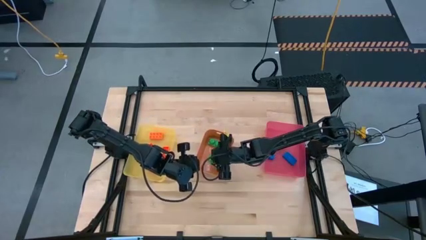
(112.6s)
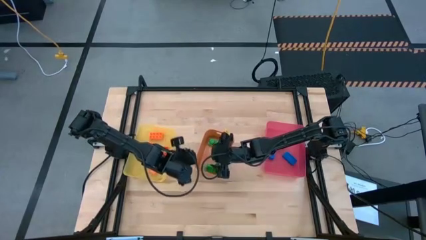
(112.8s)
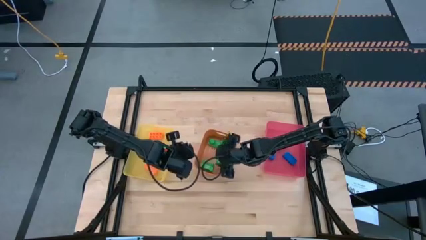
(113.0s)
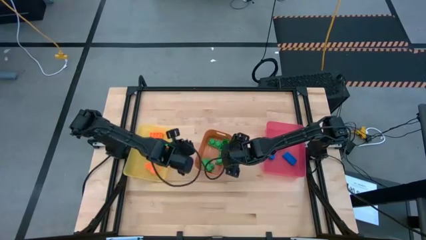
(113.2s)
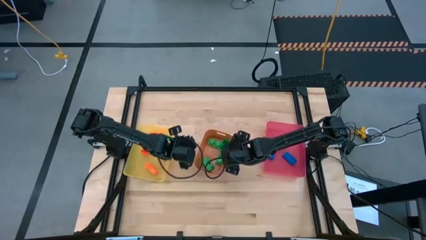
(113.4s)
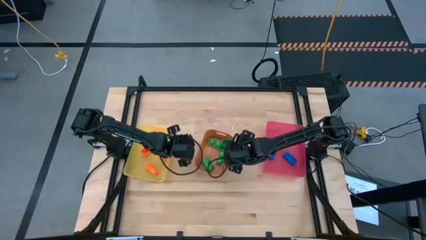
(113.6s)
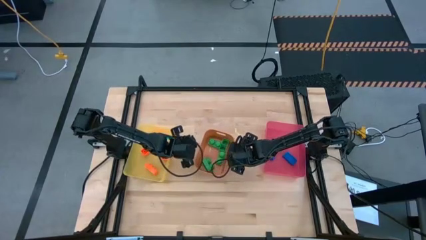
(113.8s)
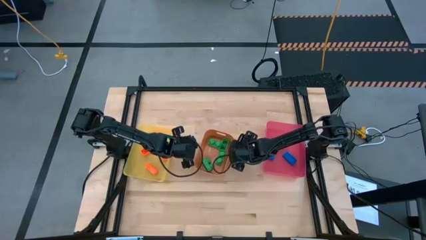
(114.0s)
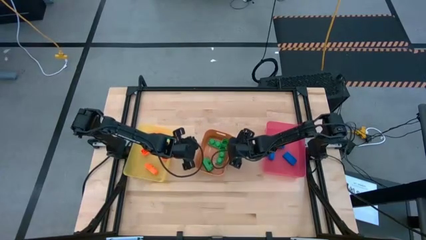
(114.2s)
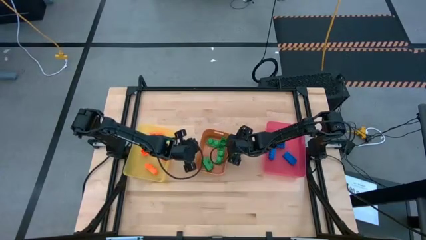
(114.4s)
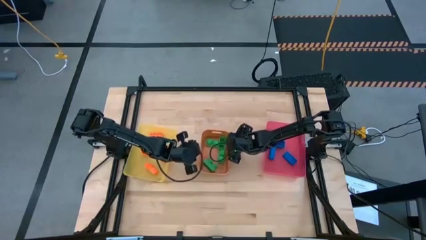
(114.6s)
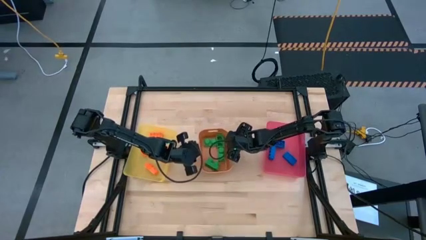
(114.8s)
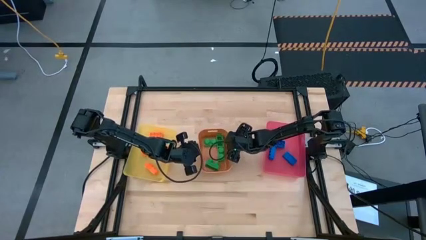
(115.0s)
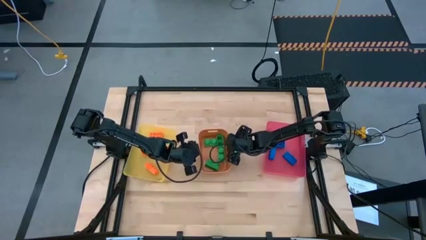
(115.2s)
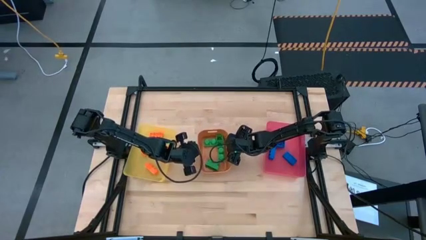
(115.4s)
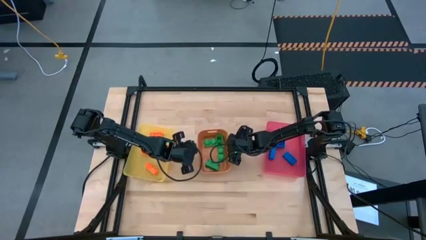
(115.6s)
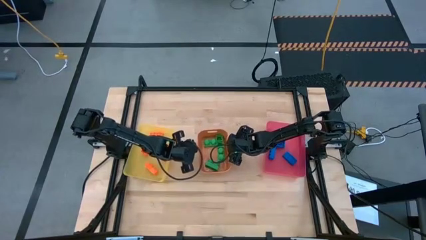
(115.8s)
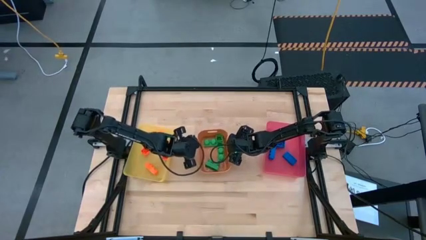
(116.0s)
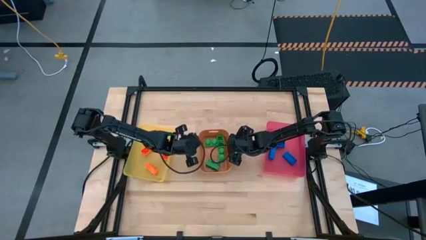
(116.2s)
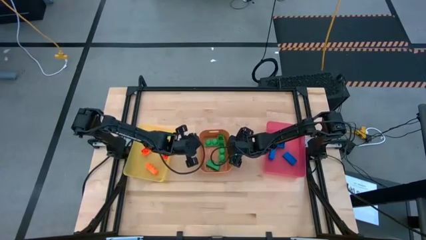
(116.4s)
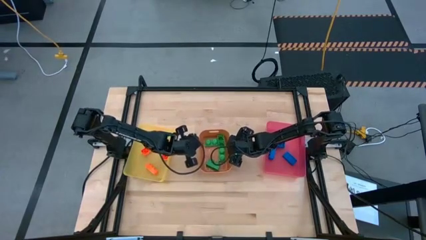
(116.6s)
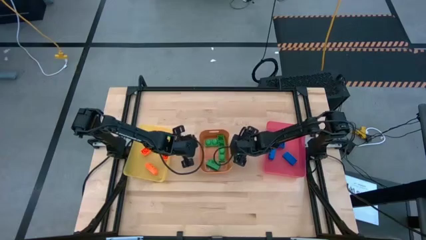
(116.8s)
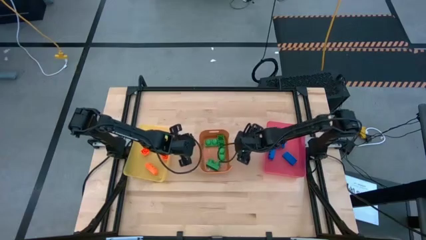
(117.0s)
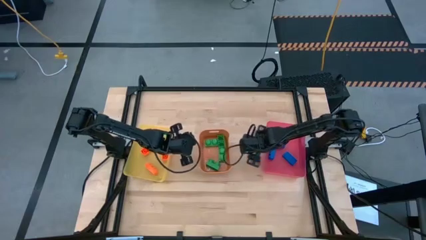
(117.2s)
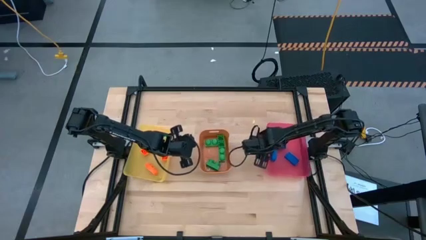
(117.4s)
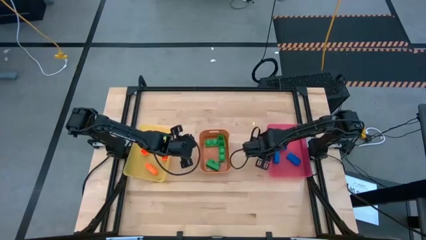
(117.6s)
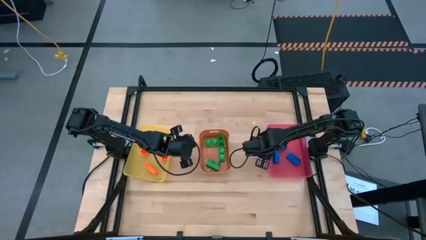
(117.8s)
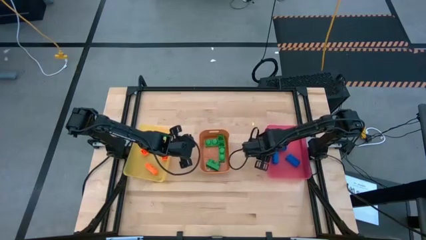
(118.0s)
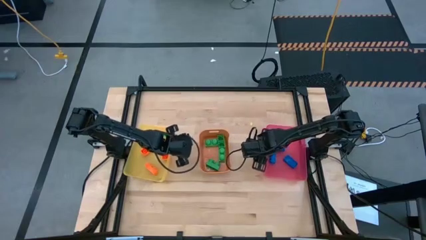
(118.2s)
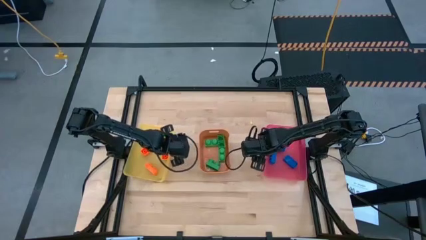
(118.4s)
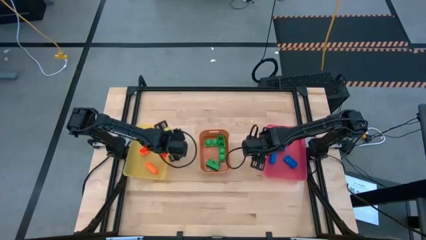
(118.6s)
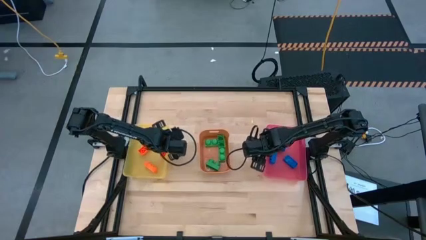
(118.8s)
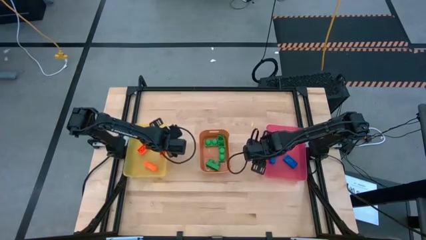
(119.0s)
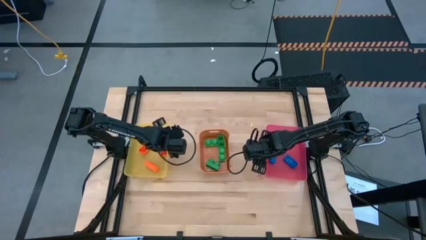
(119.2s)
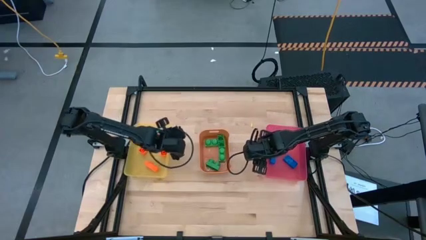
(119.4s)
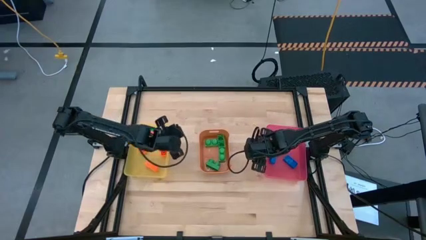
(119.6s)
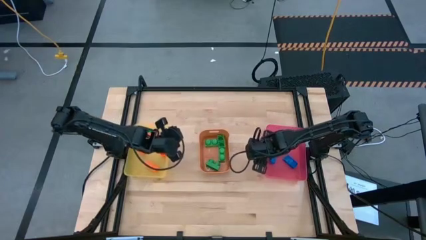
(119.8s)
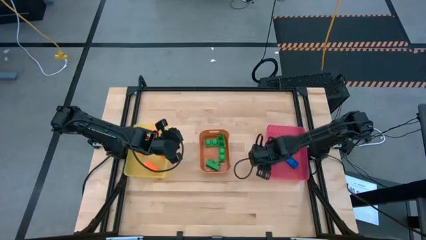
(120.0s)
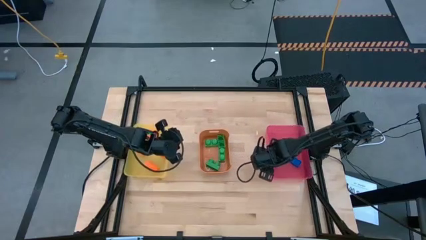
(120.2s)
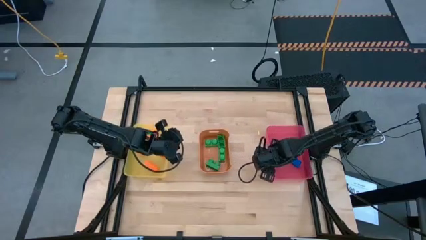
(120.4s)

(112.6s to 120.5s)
Task: Sort & place blocks by color
Adjust the bins

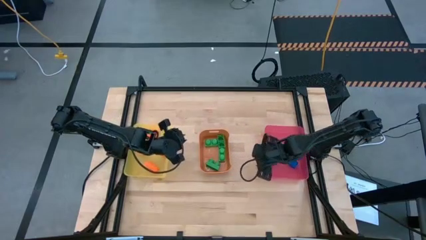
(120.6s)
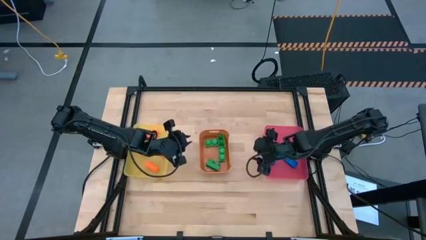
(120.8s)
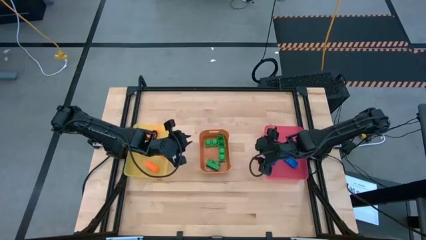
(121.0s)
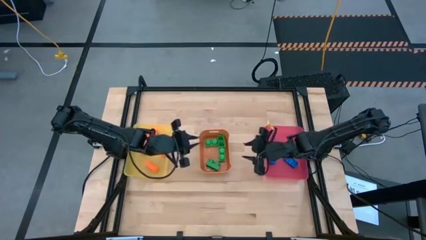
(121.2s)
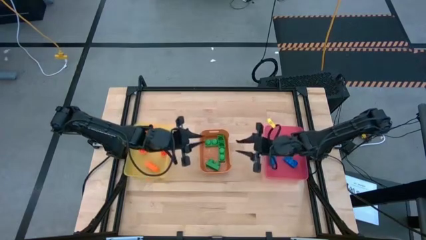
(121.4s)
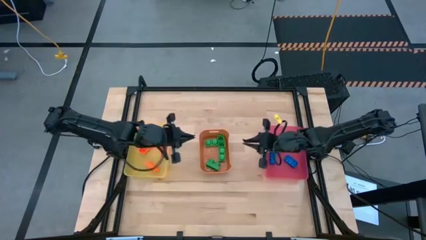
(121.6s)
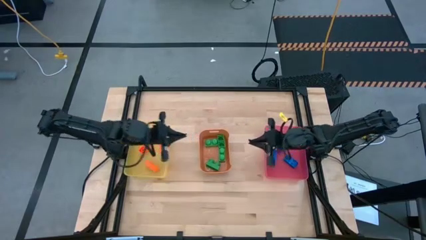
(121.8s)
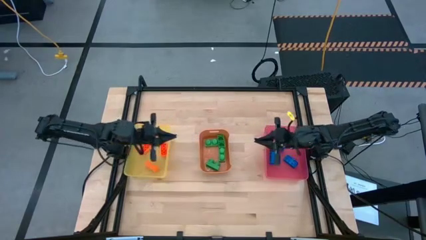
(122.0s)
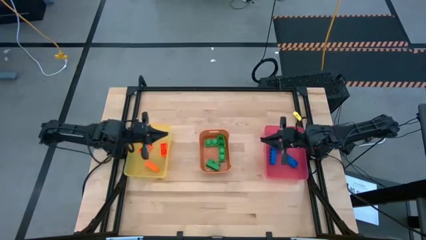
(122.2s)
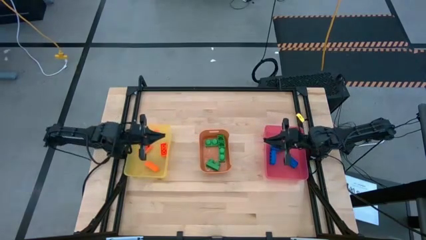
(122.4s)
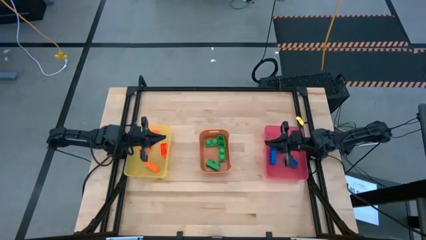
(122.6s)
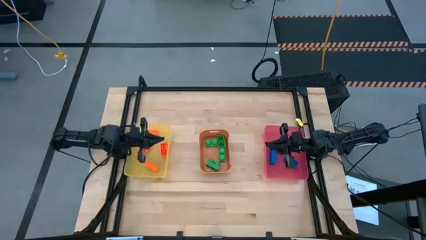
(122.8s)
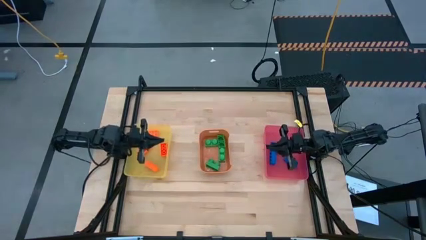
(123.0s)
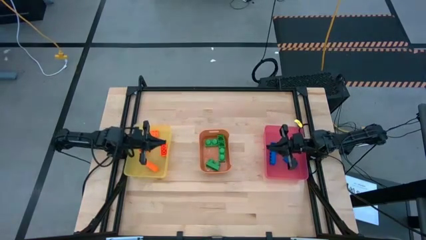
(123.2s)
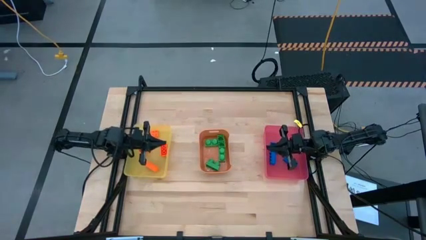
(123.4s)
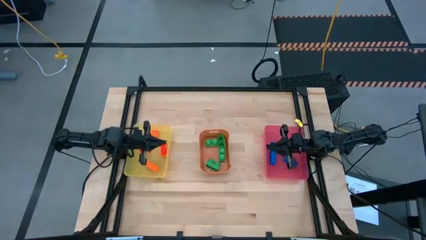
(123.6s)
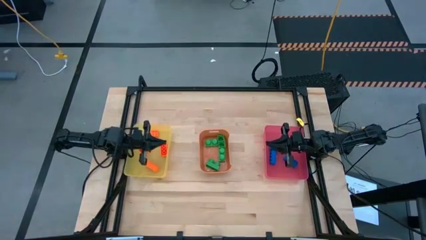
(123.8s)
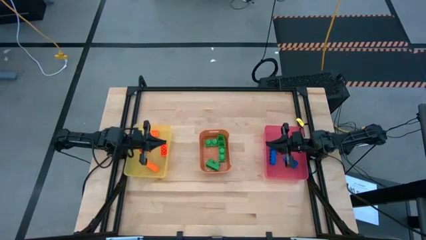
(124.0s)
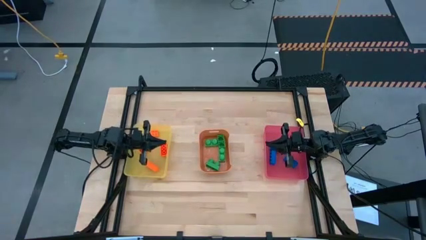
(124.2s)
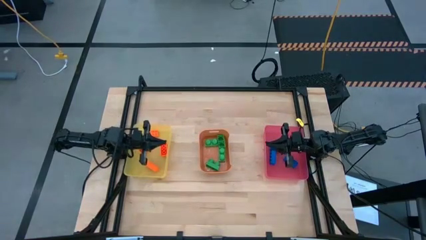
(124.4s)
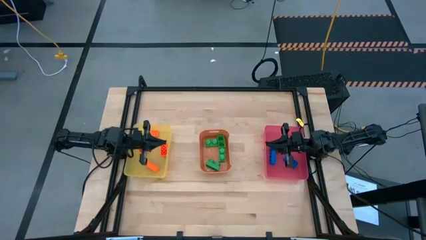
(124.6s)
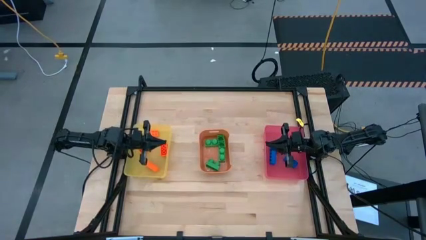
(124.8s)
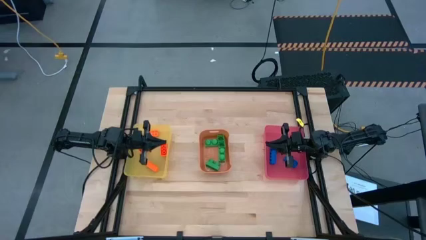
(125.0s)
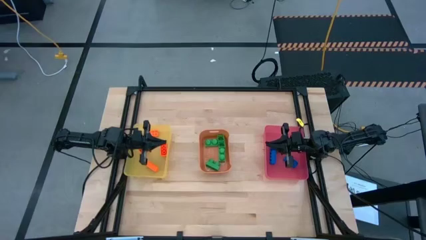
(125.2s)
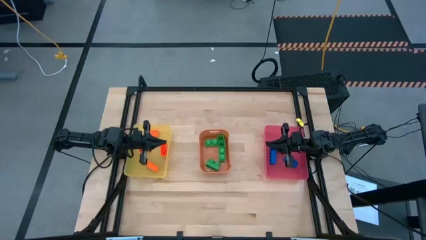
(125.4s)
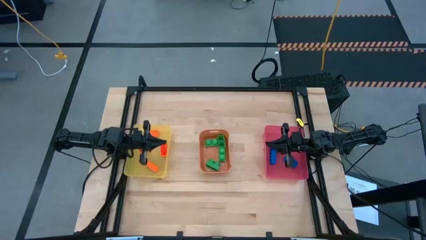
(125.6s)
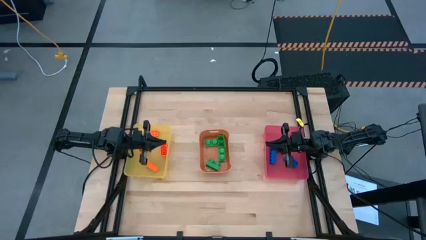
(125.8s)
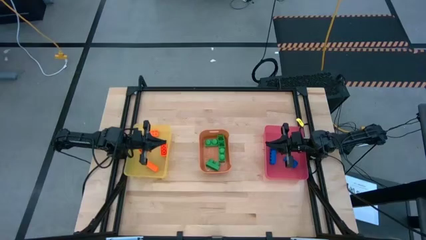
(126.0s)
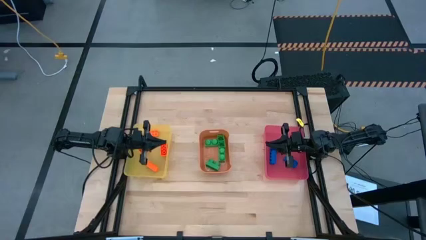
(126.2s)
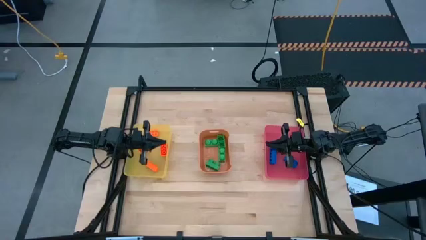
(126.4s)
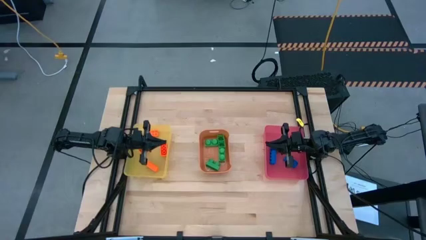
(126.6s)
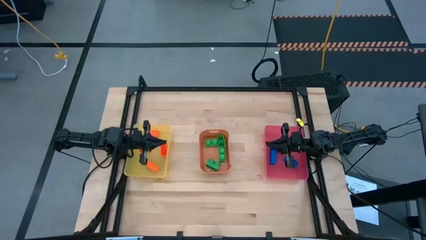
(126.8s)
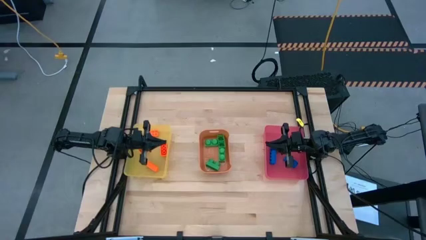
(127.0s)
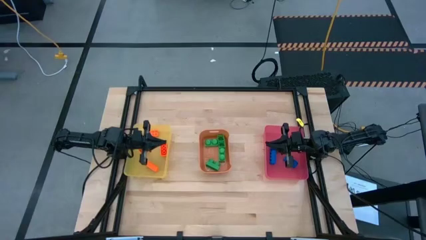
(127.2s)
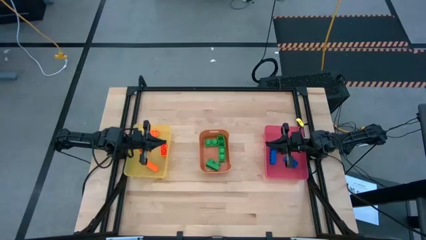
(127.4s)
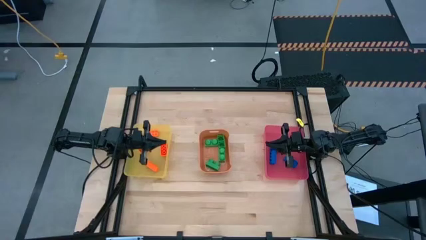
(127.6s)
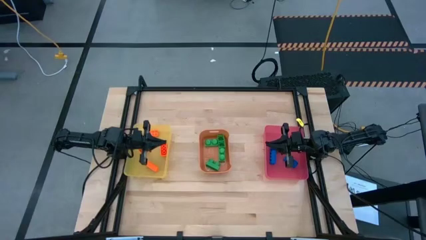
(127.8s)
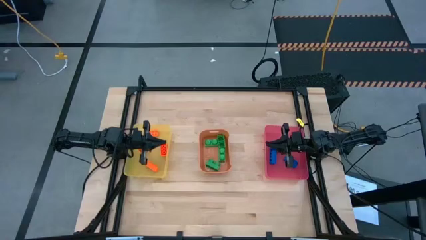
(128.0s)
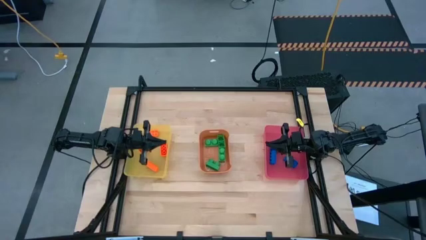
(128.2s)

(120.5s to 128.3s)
Return to Home Position
